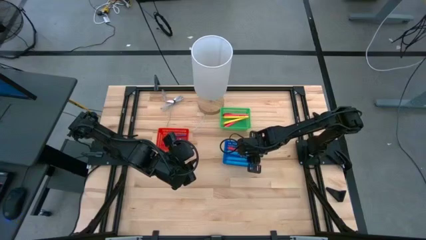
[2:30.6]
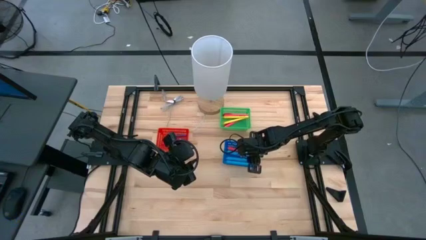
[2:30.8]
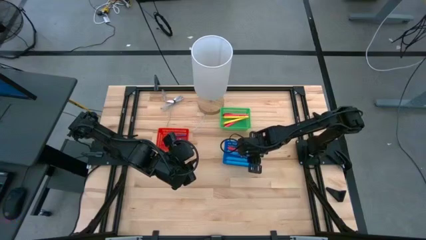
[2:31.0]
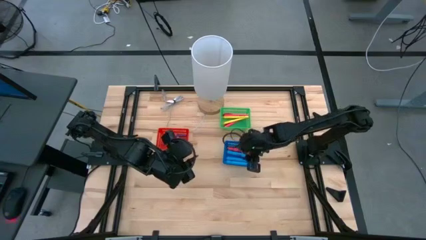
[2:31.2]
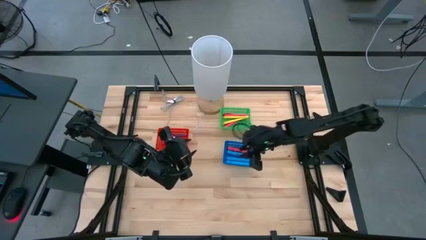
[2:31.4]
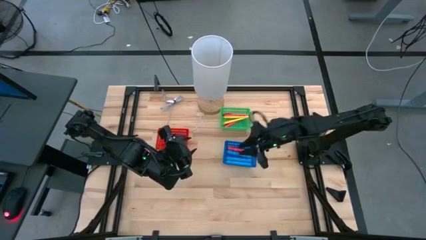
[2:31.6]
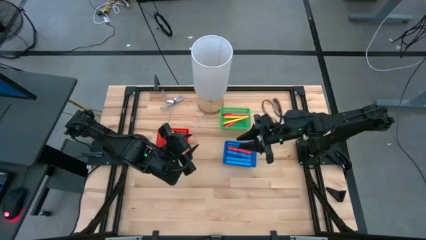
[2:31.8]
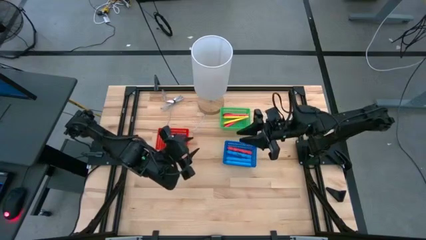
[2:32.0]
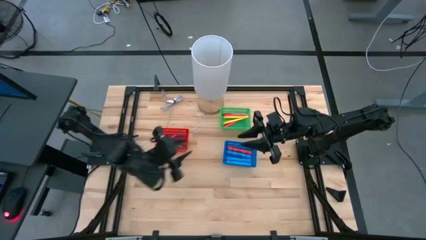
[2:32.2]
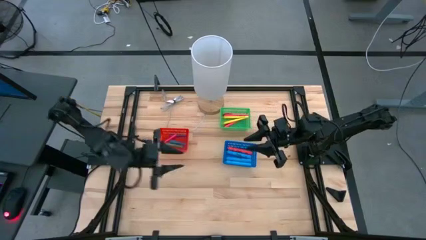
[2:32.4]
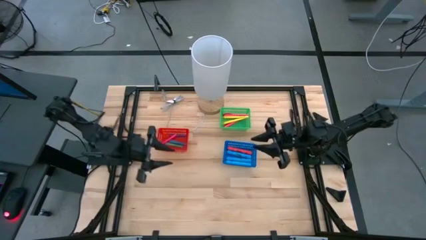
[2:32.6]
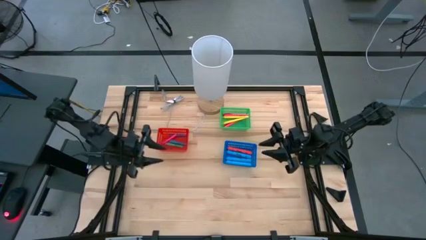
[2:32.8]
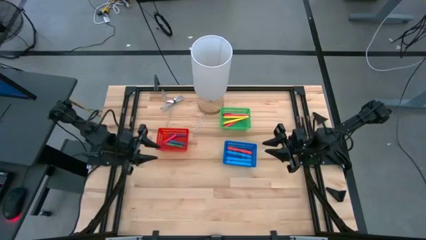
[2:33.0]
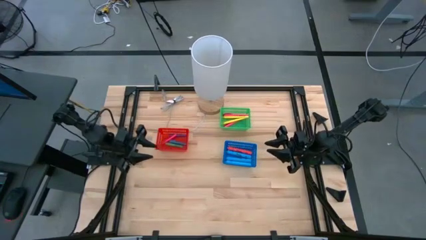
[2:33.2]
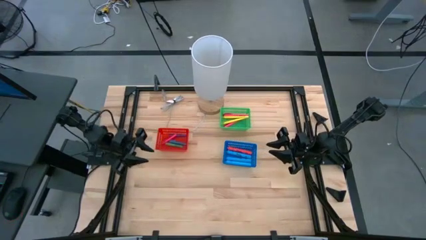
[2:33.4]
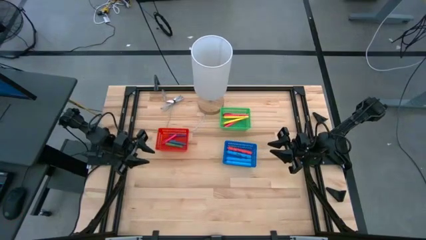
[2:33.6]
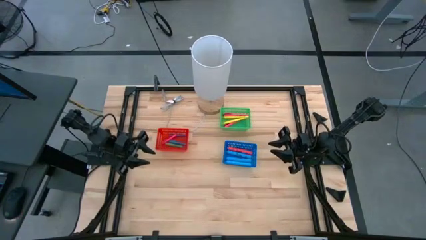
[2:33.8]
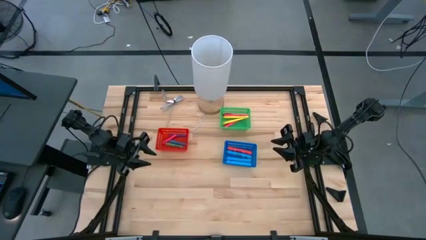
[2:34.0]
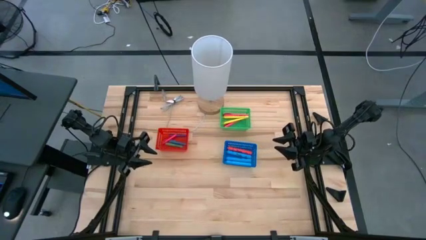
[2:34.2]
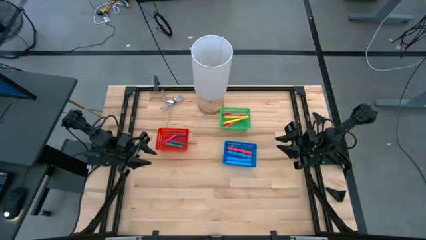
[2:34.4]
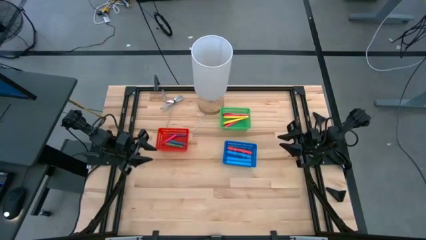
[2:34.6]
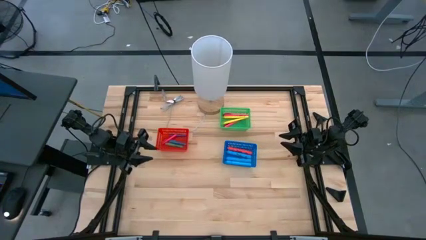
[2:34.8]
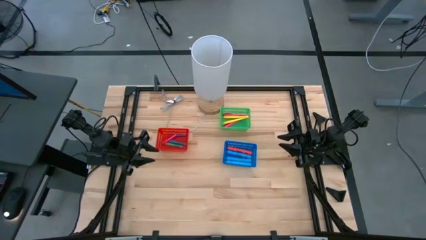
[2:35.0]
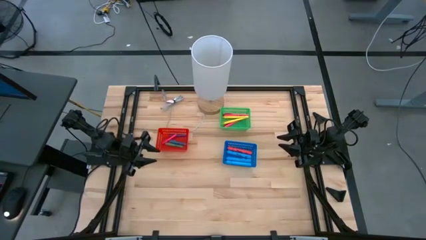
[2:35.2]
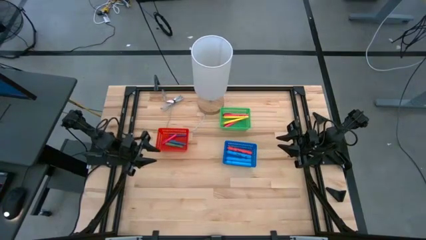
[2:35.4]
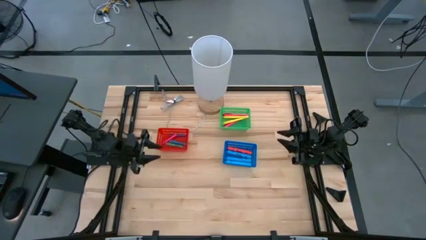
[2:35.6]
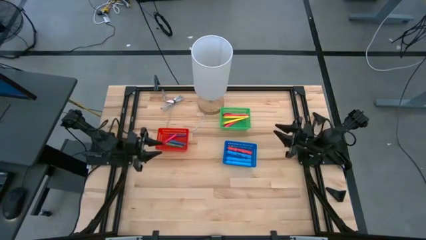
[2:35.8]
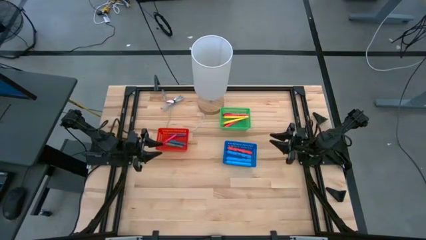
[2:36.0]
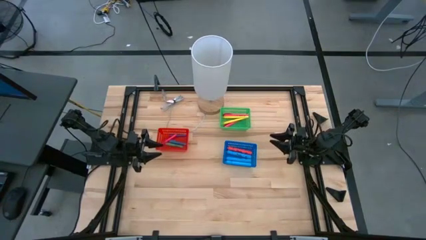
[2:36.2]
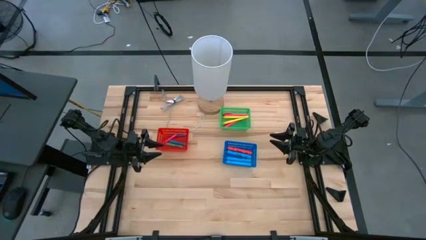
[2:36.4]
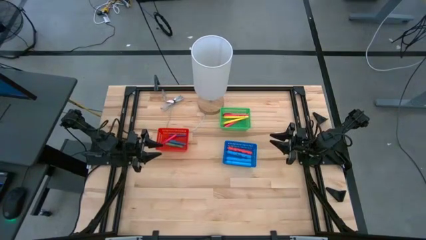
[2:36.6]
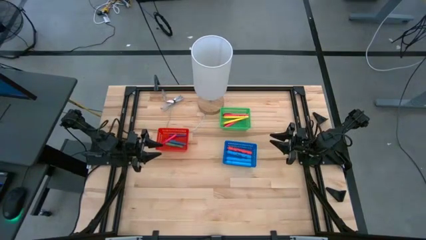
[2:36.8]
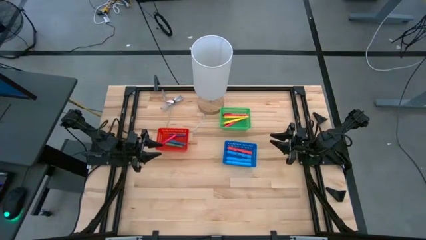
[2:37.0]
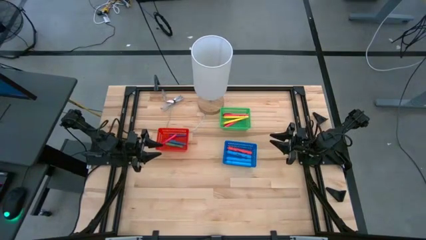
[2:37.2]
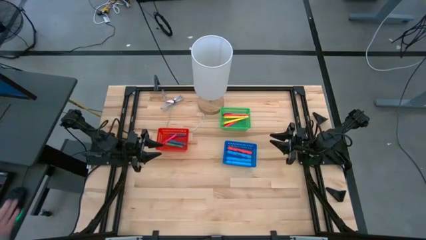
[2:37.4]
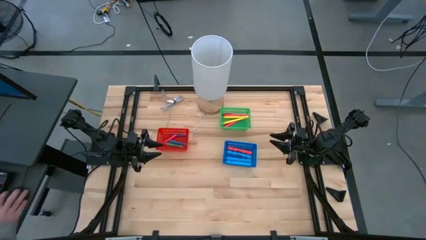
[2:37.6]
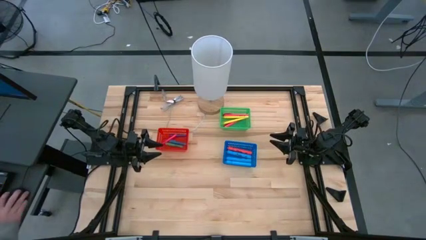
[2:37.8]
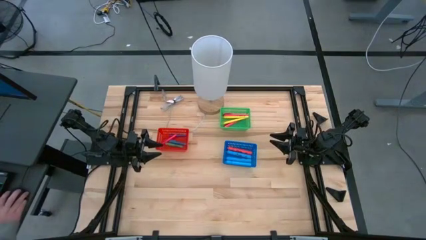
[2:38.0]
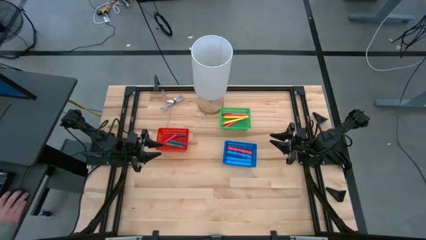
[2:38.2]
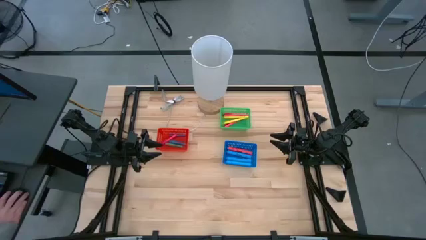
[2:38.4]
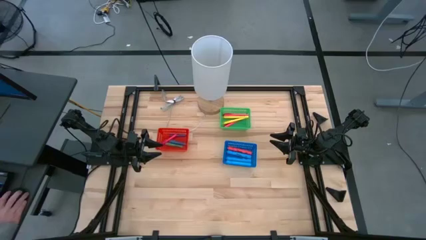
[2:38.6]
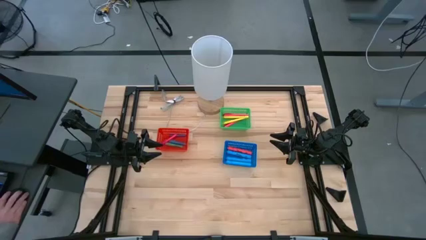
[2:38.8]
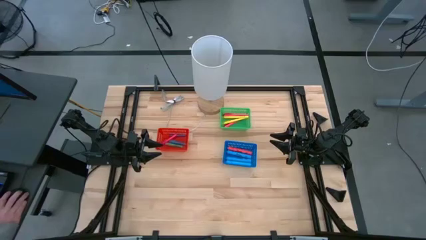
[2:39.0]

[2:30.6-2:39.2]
Task: Pick & Place Markers
Return to Home Position

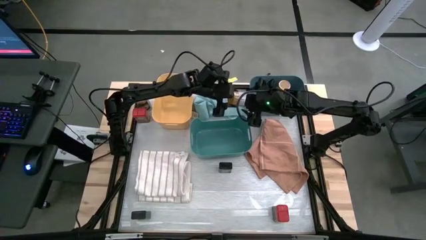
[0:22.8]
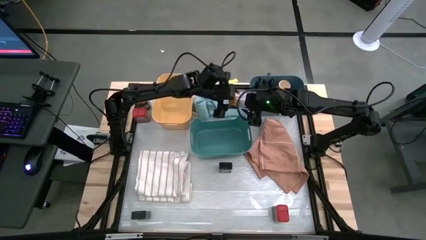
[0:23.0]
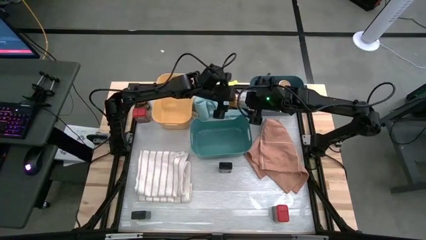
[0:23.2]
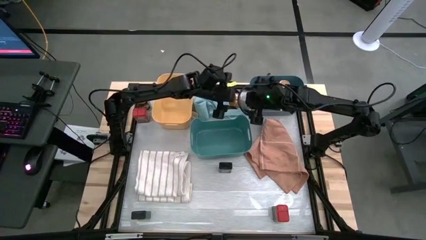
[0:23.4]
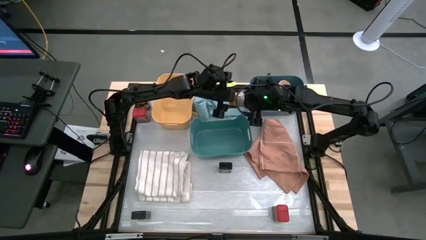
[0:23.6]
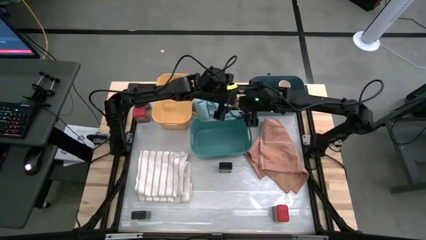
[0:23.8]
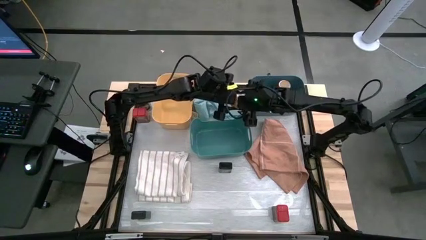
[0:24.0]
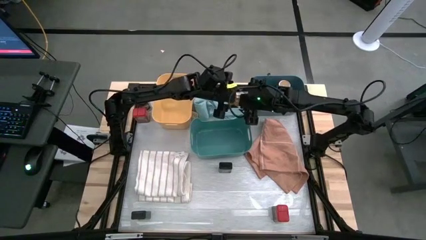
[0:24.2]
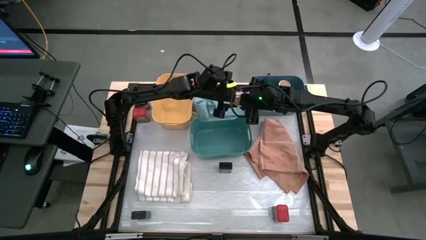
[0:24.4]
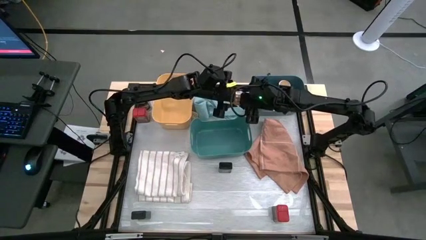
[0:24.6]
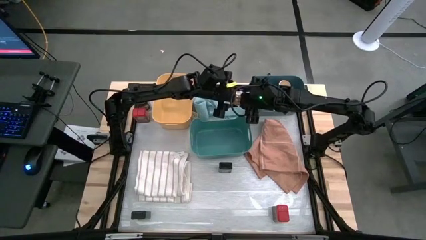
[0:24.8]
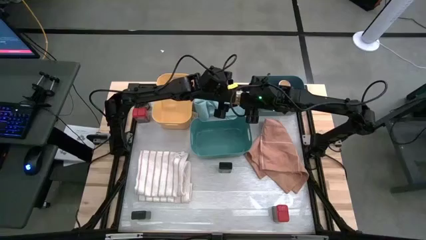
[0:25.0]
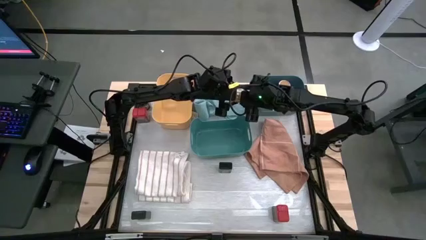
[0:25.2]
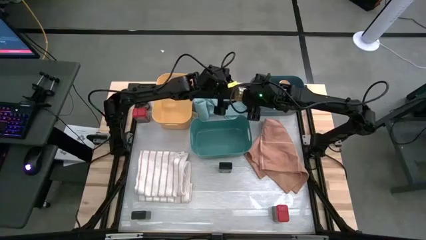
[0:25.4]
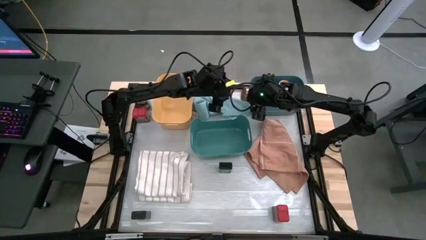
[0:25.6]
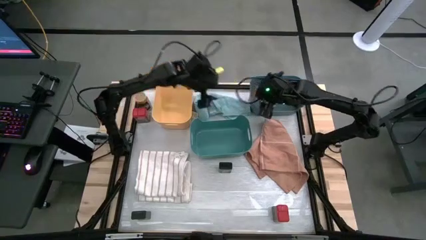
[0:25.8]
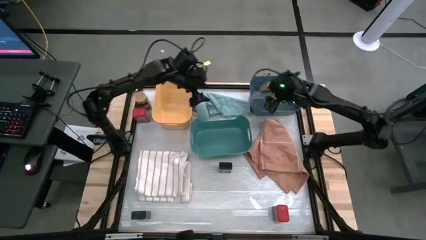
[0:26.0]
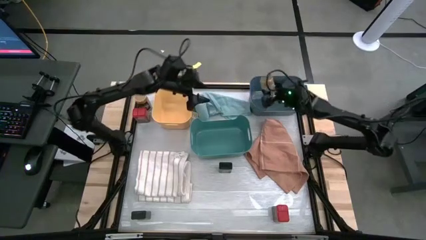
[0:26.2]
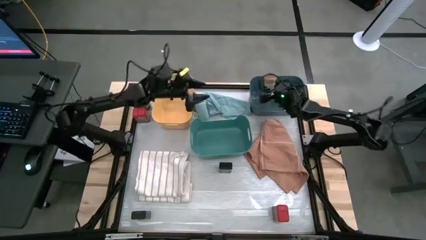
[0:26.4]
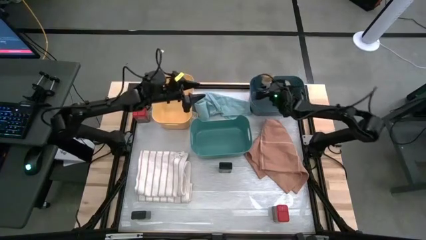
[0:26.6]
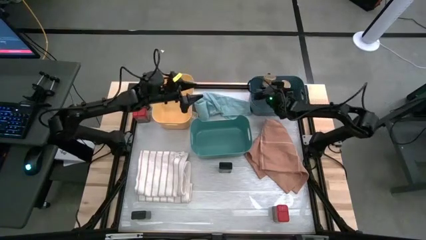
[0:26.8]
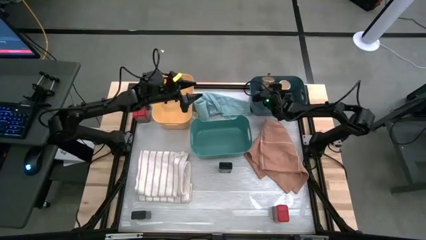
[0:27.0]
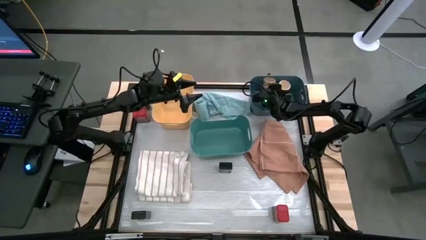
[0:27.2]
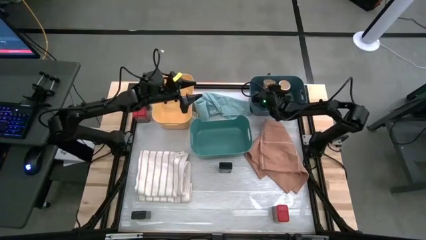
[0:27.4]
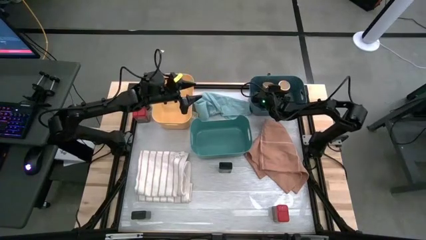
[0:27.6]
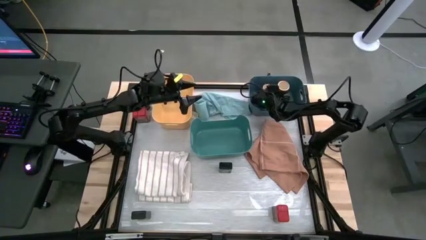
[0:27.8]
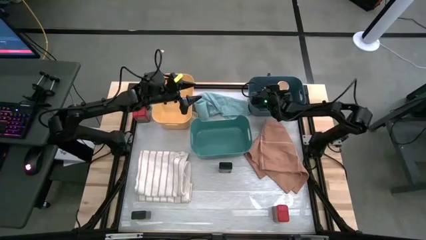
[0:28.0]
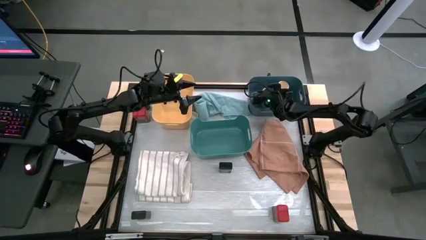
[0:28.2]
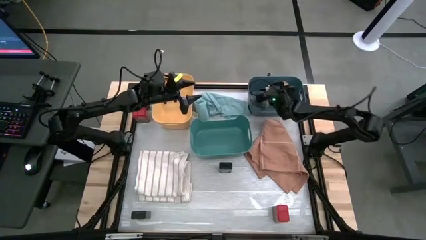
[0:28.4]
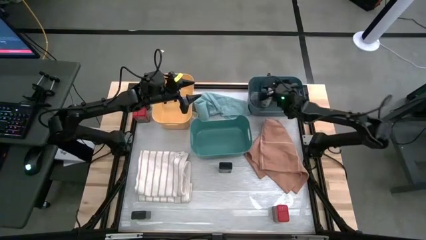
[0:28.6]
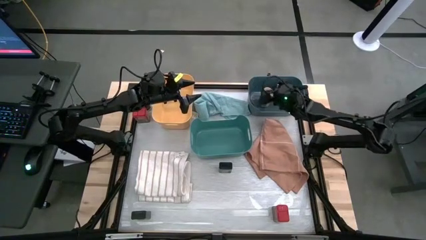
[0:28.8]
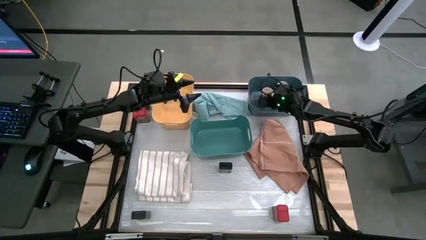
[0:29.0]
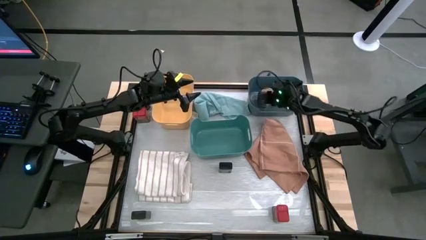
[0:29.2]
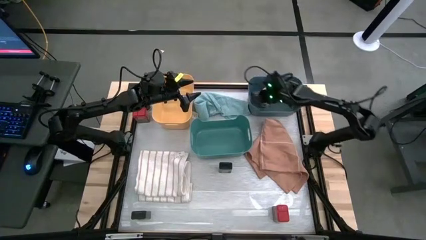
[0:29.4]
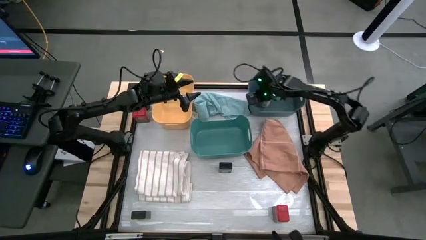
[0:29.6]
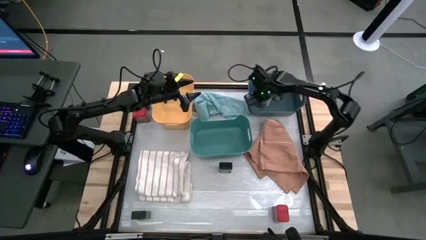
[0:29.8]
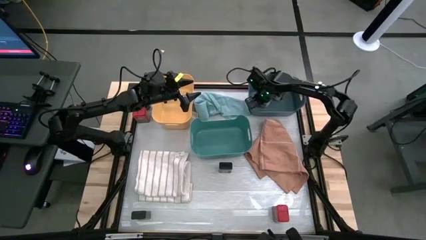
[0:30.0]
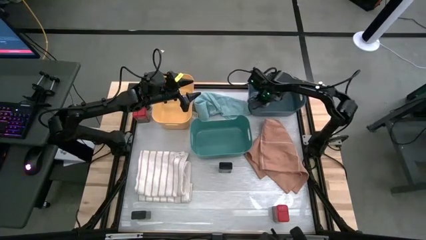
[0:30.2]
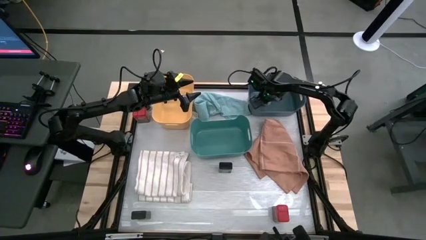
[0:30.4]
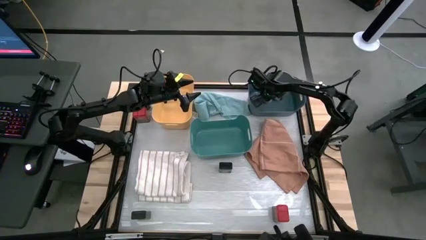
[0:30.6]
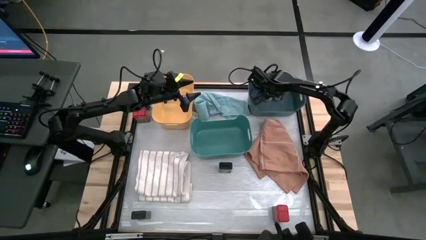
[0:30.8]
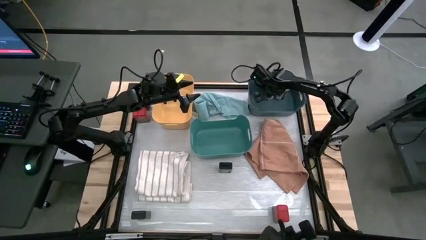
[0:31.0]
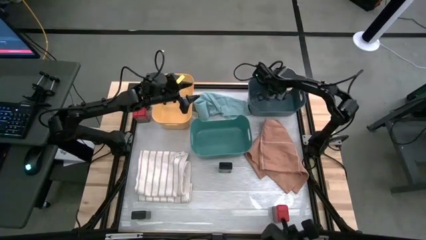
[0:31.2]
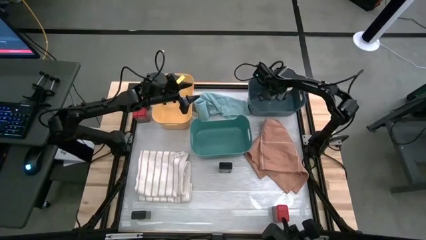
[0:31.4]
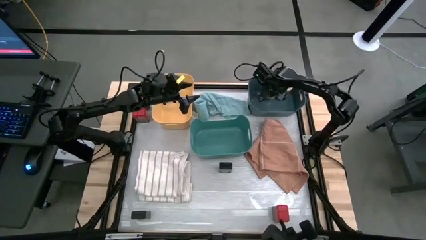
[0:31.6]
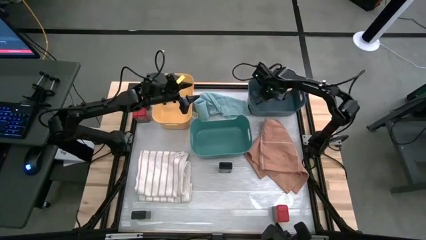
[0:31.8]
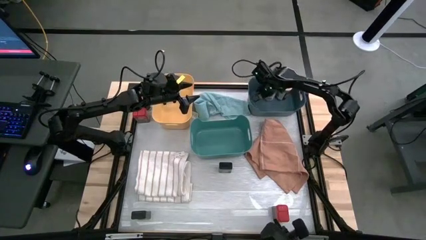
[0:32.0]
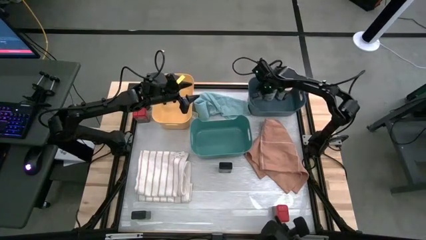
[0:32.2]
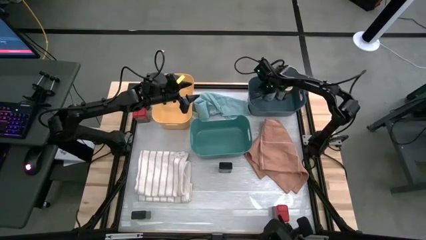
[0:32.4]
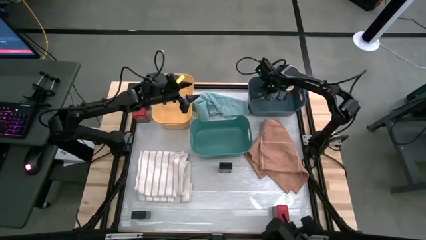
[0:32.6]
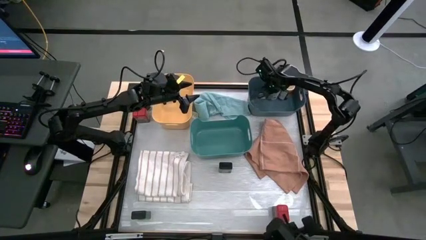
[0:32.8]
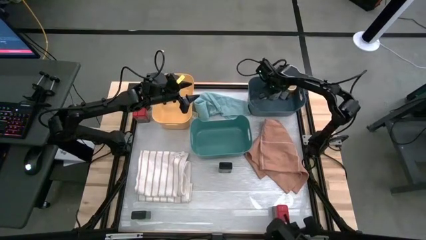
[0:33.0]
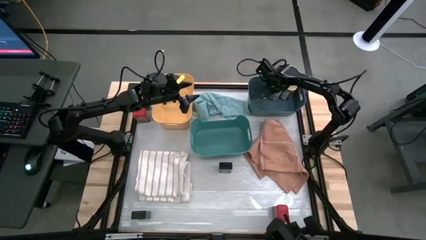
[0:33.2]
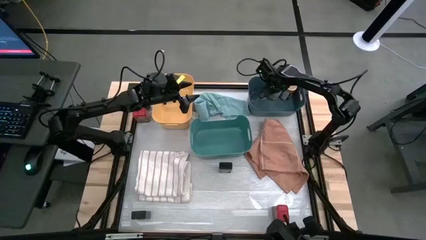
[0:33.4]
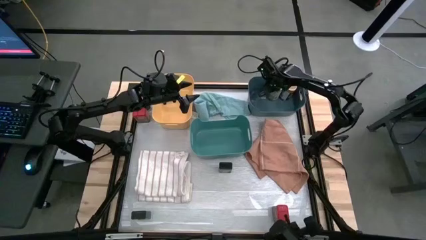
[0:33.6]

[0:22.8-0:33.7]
Task: Sort spices by type
Put the bottom gold seasoning bottle into the blue bin
